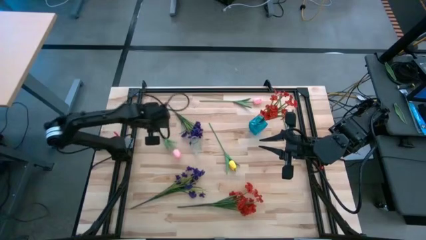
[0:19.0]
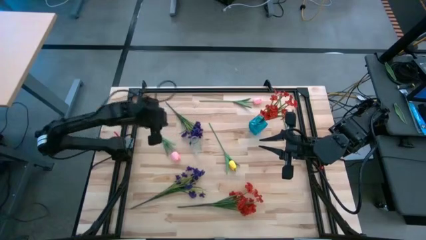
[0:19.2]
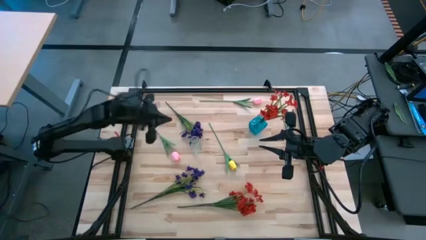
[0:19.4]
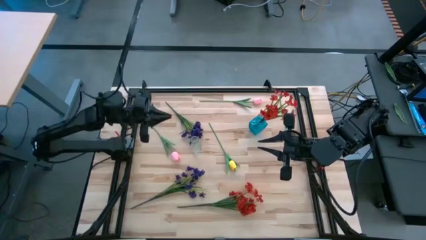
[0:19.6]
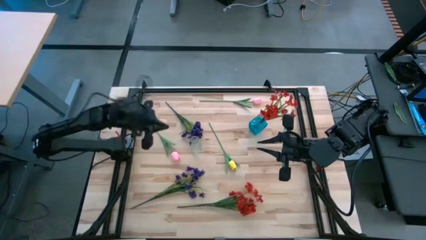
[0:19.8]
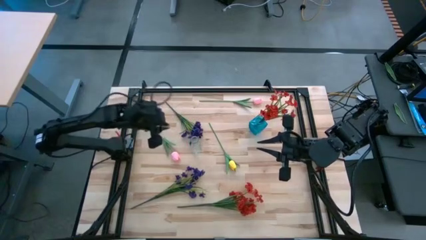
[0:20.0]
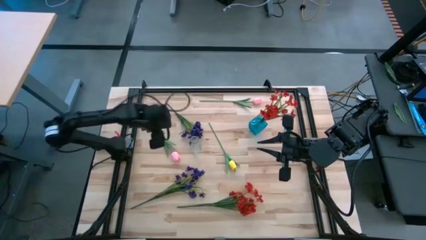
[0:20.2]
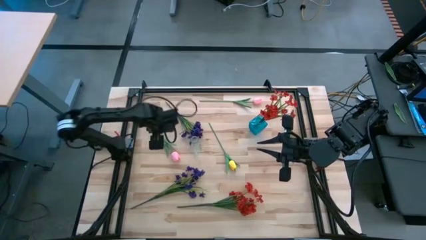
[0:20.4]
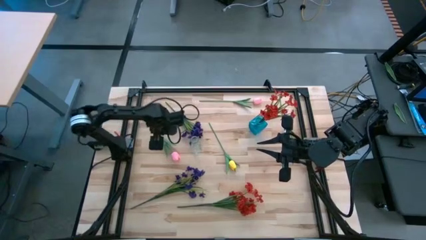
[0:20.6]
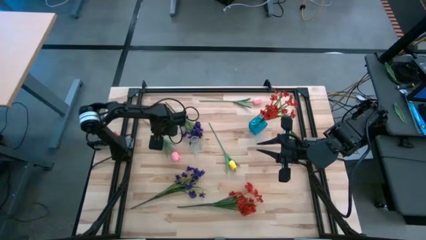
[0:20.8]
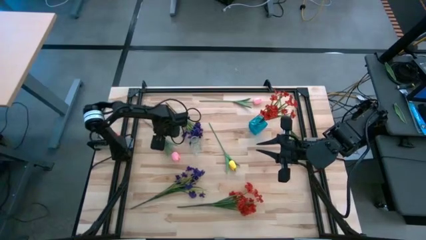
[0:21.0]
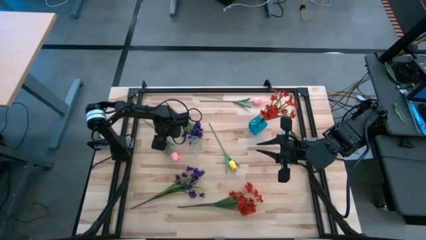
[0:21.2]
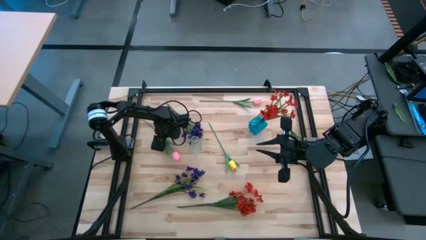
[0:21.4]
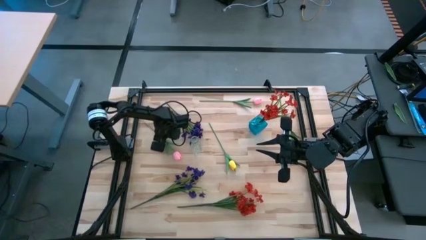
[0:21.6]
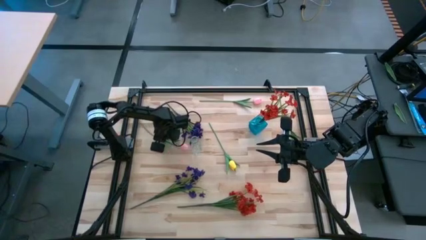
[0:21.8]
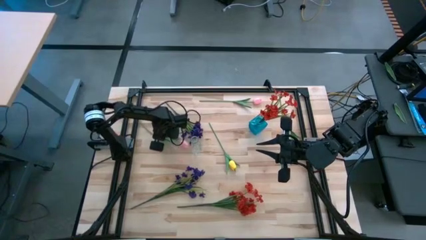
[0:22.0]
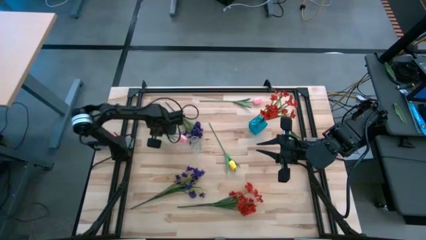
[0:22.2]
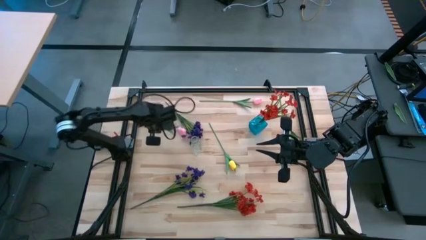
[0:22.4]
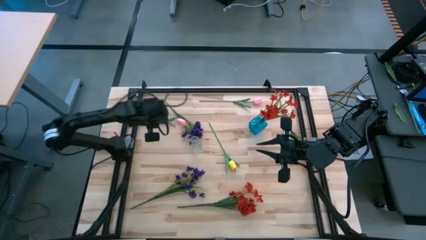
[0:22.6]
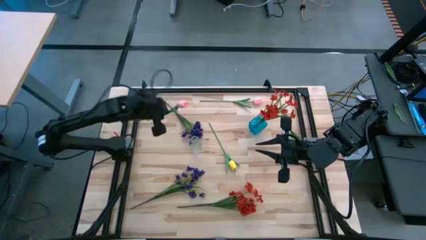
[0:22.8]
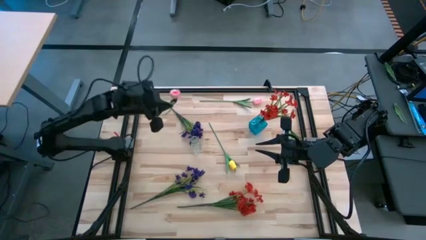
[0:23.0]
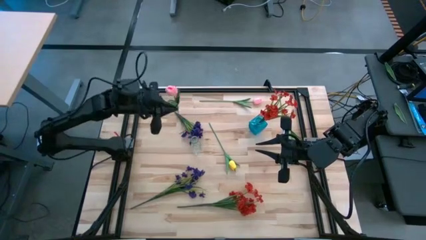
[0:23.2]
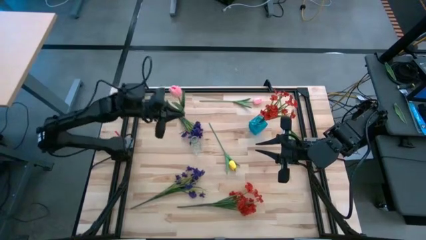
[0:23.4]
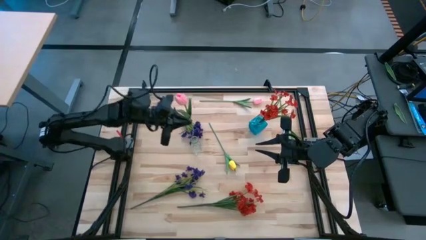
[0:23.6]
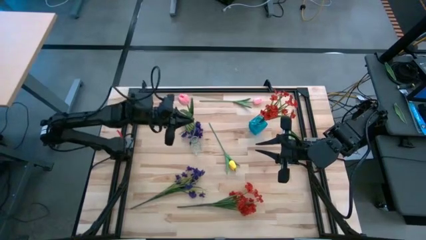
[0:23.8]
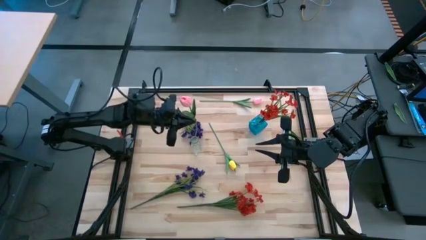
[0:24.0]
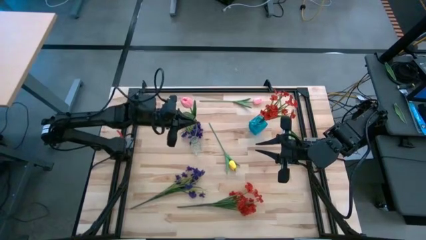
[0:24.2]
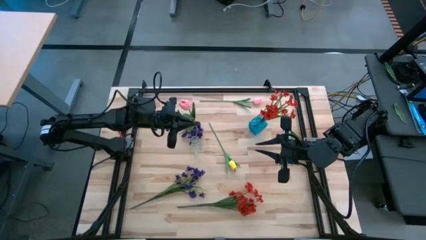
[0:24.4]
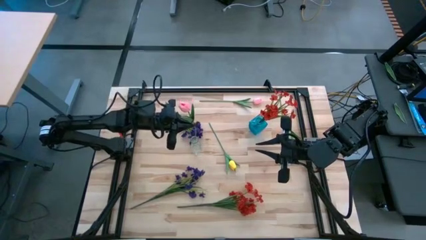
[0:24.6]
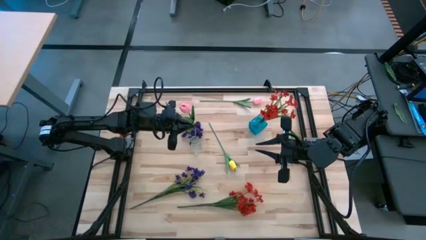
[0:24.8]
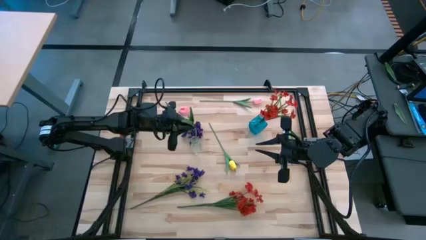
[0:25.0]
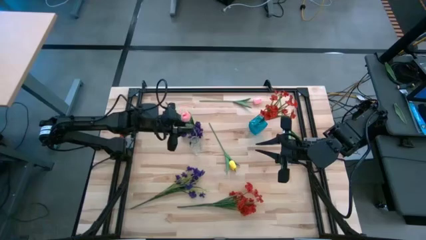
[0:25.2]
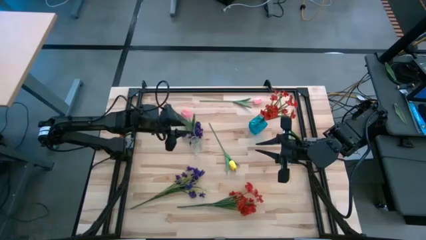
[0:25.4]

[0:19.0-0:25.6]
Task: Sort flowers into vase by color
Put the bottom pink tulip into the transparent vase

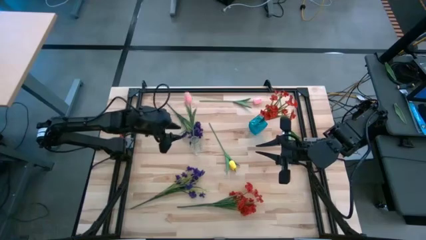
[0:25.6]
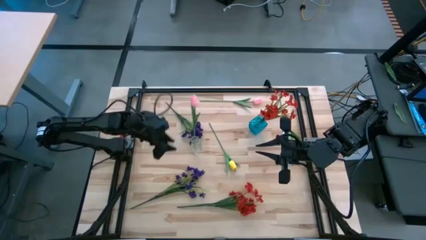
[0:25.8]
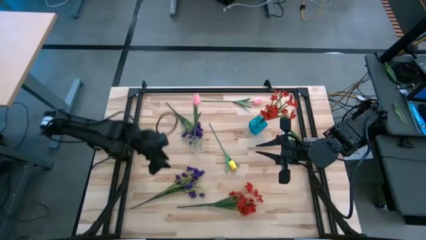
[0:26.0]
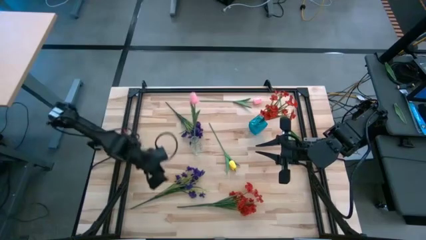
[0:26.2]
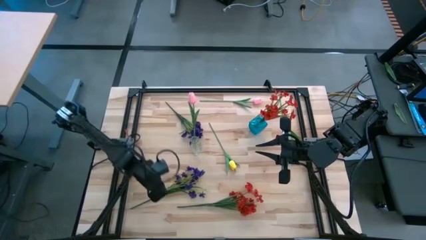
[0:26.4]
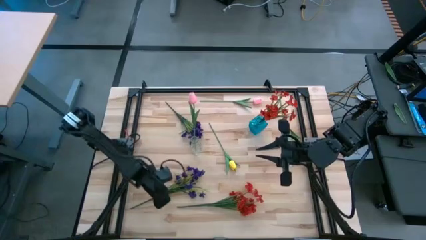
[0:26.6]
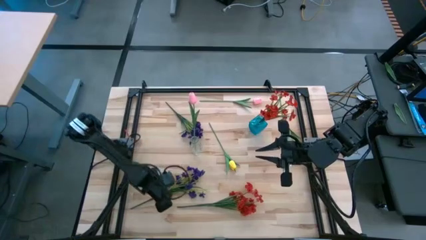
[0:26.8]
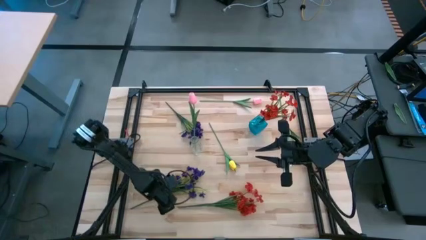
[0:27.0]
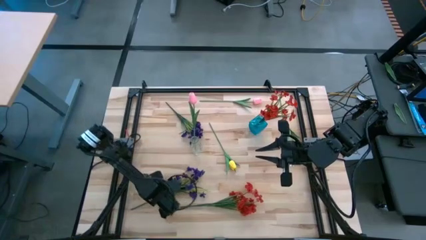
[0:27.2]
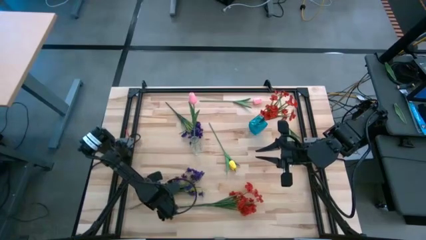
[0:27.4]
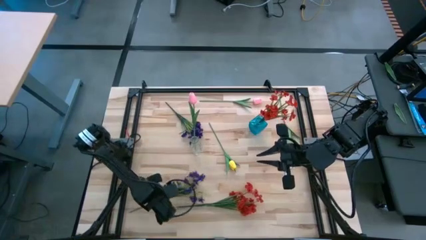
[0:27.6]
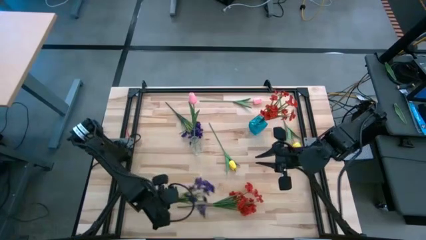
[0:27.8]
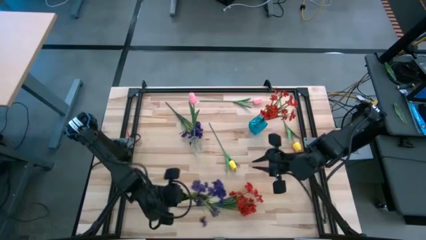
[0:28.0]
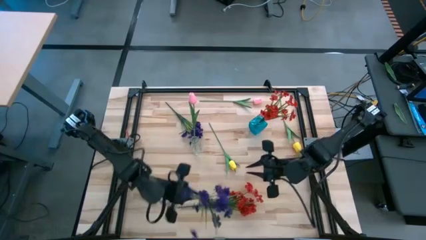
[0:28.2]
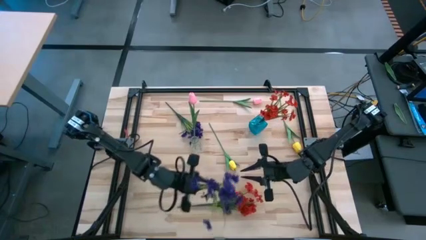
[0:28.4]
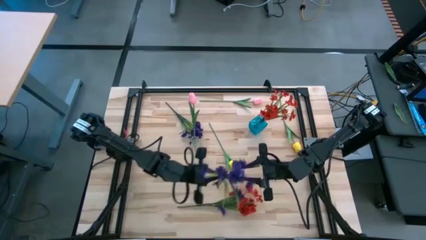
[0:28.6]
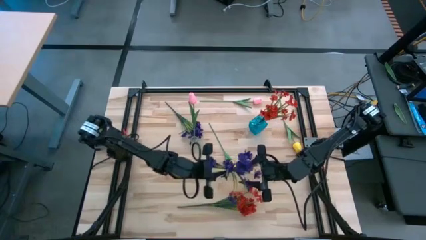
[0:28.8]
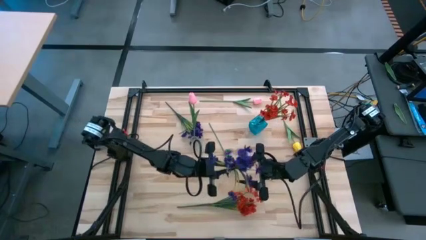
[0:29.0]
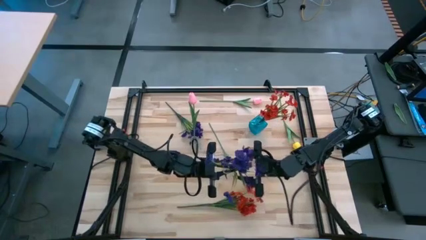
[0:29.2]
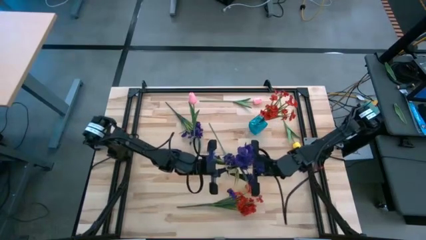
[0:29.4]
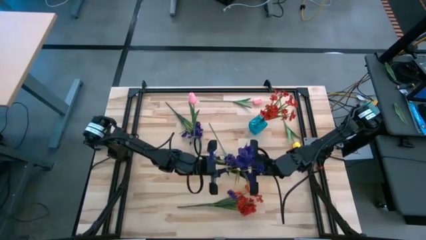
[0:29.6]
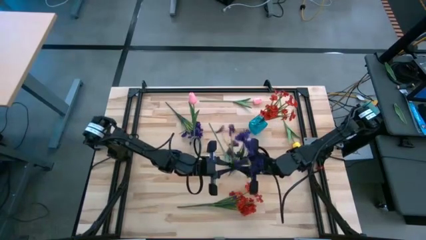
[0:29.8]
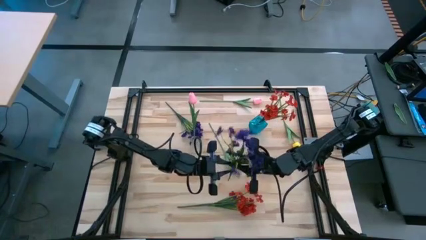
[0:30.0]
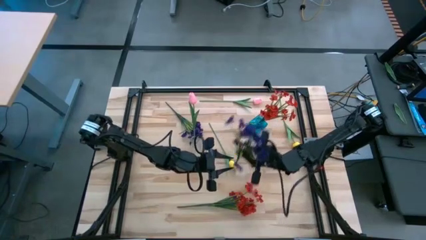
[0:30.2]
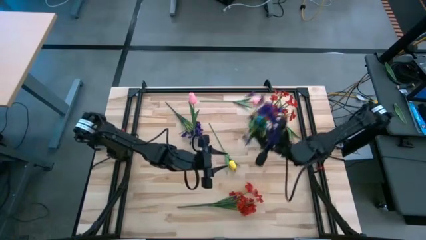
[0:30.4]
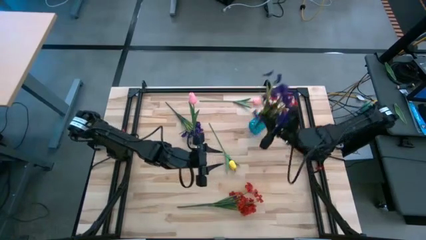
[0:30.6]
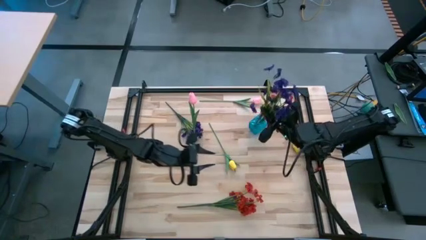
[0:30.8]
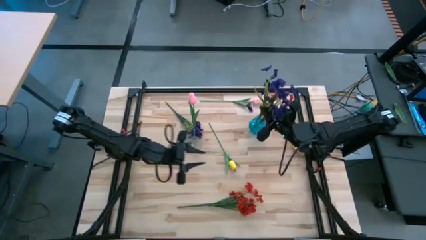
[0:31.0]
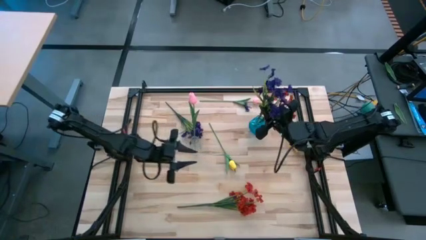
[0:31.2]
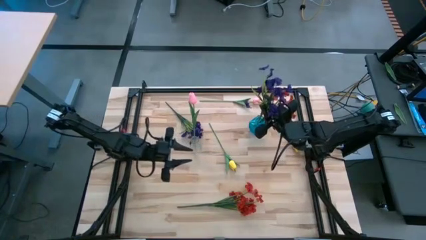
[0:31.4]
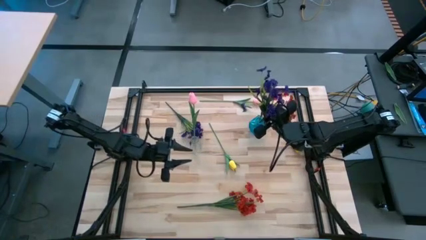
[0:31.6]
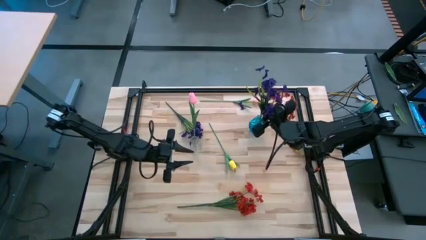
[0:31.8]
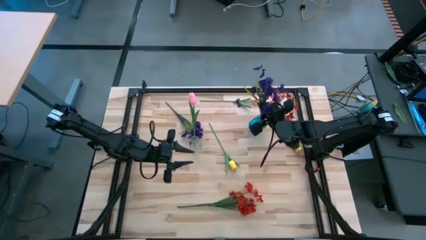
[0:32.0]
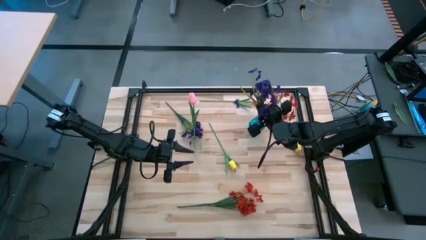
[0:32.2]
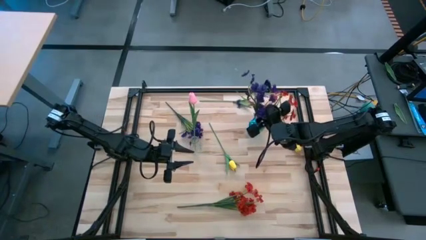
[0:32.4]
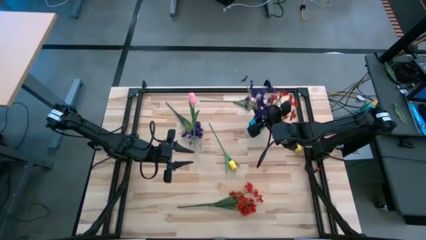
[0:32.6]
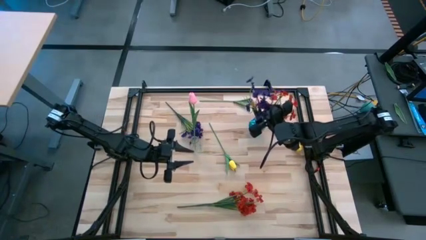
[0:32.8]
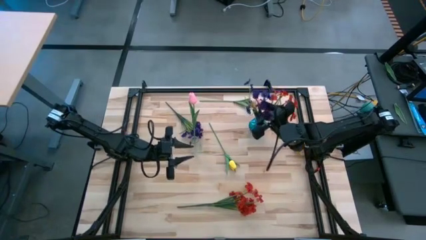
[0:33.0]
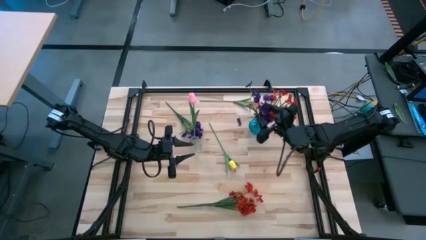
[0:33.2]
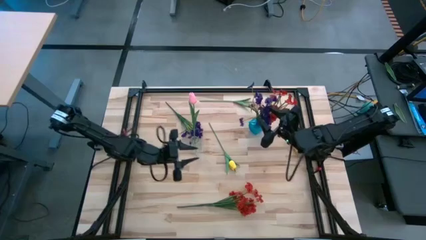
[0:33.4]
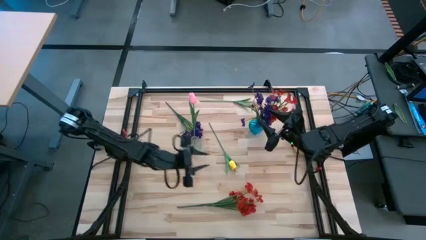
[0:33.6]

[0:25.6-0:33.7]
Put the bottom purple flower into the blue vase

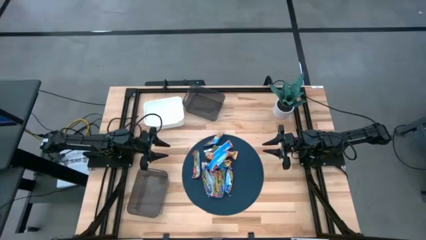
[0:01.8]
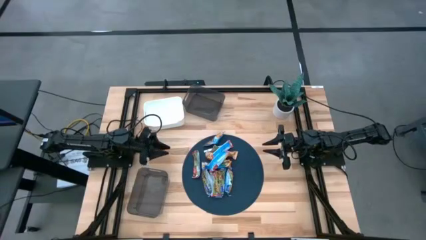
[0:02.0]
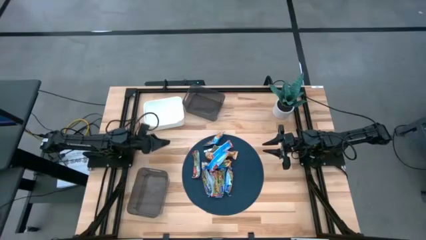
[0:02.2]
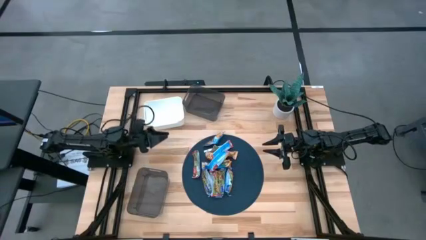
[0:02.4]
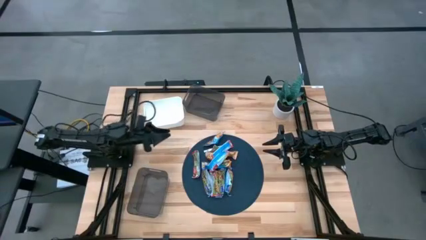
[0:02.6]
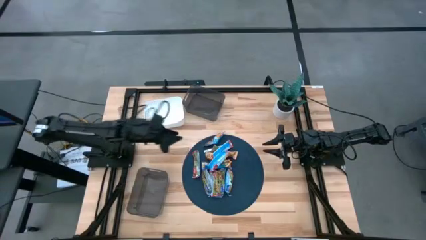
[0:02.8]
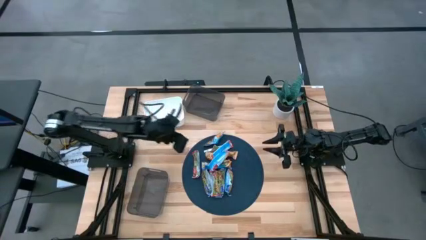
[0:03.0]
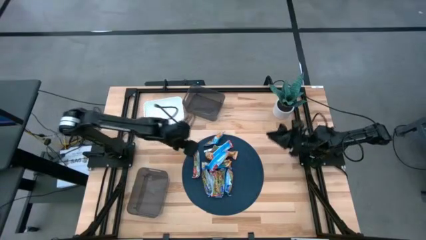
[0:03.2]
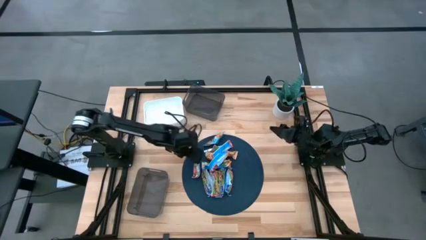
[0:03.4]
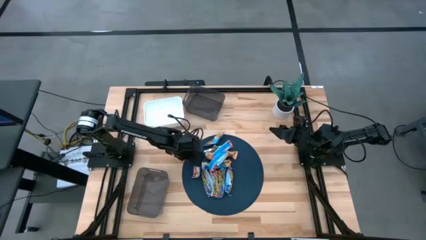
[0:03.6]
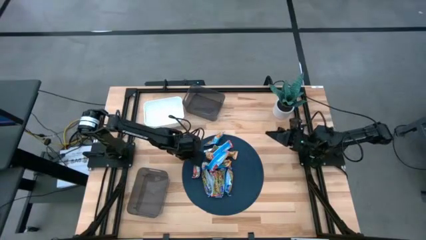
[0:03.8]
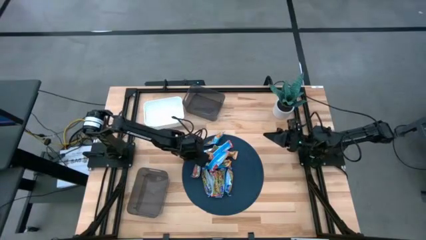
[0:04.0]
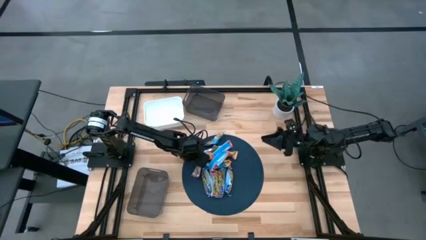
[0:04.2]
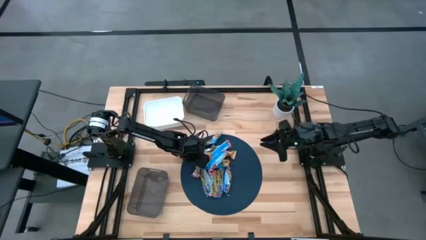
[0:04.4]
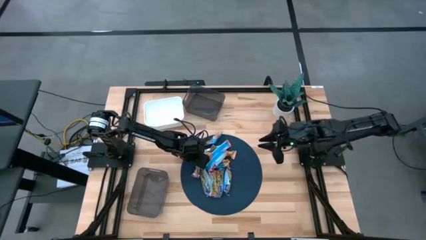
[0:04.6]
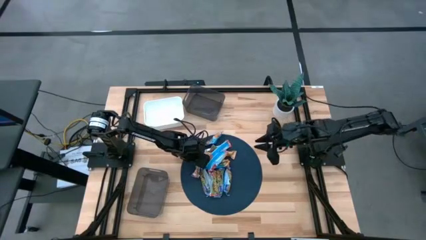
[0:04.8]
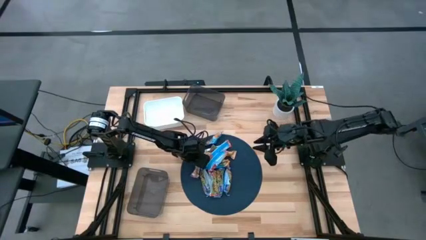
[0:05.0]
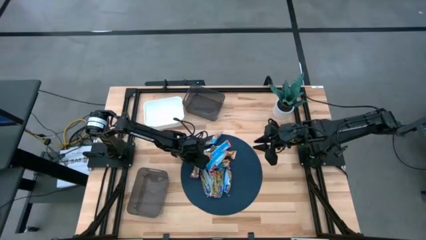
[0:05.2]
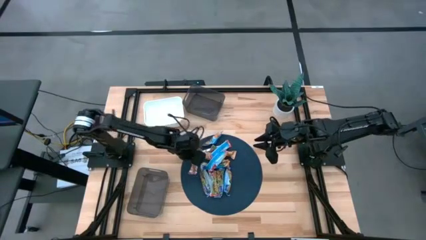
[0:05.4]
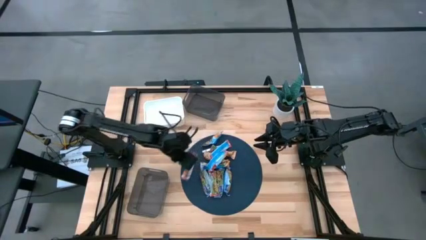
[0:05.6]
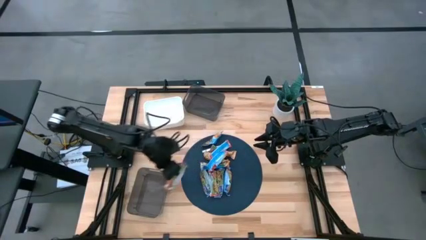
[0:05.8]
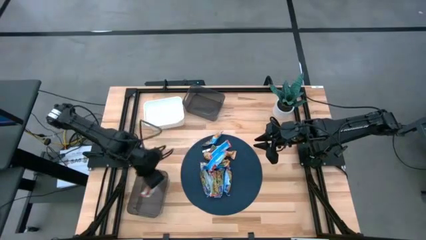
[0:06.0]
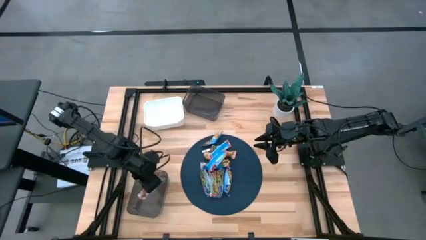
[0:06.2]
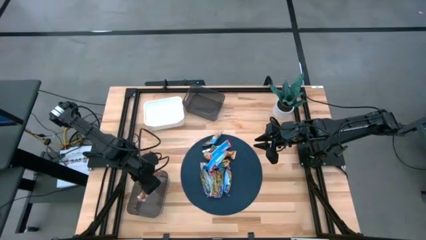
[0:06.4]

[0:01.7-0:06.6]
Task: Pick and place Granola Bars by type
Put the red granola bar into the bottom black bin
